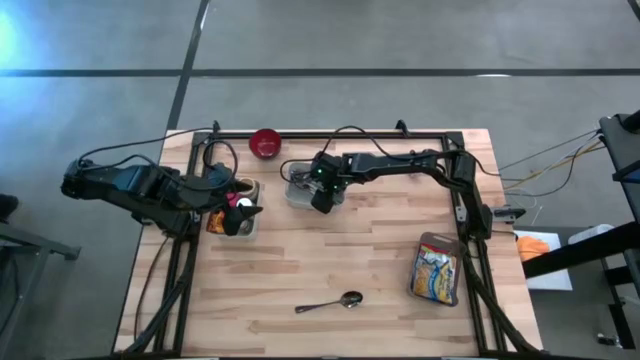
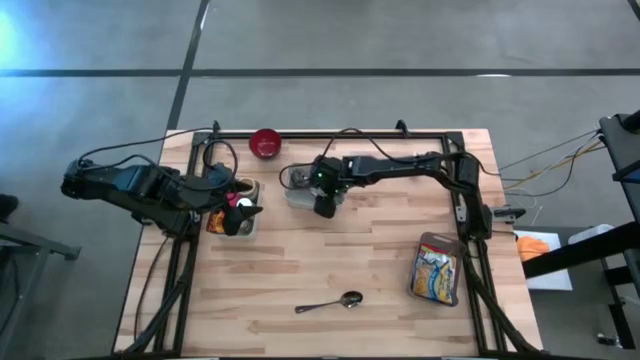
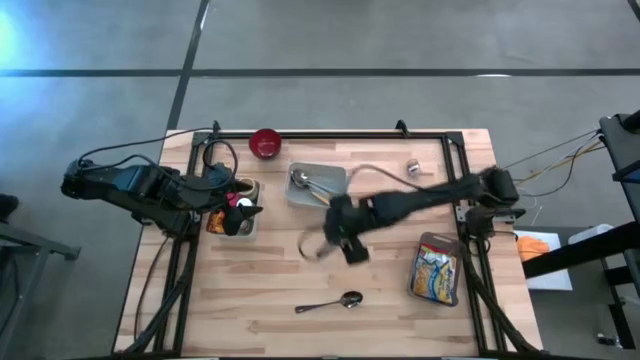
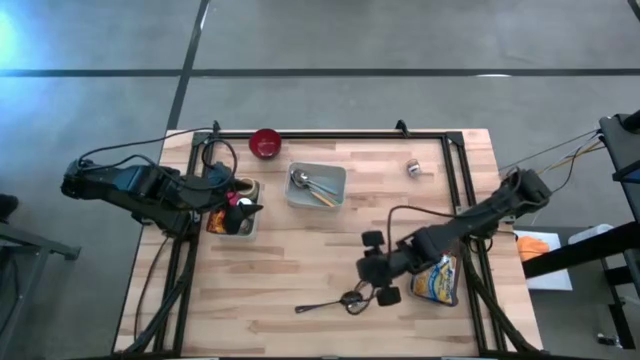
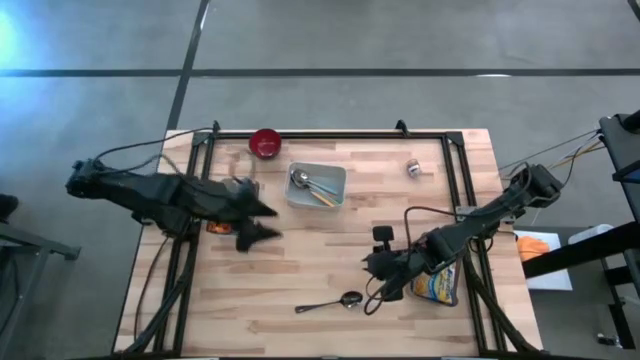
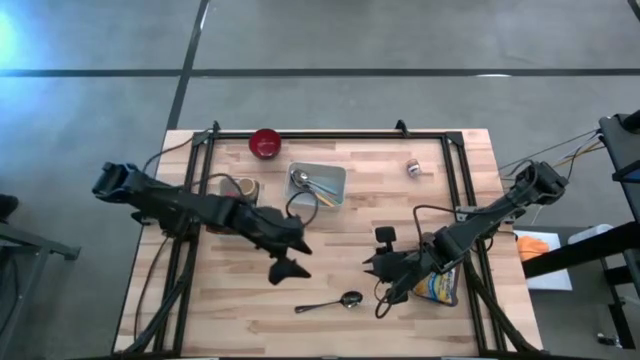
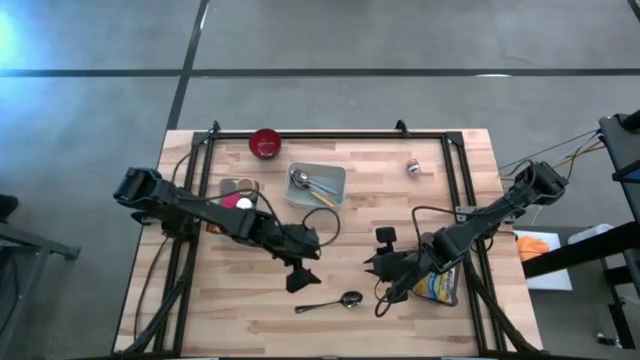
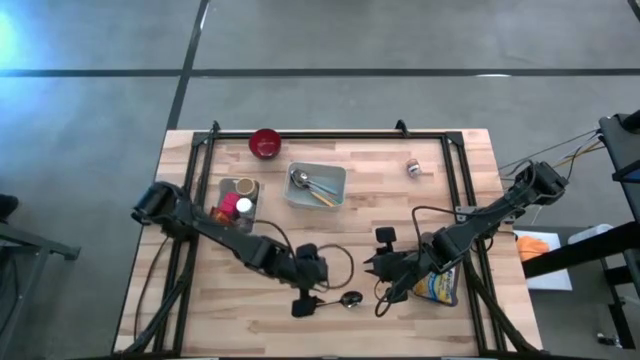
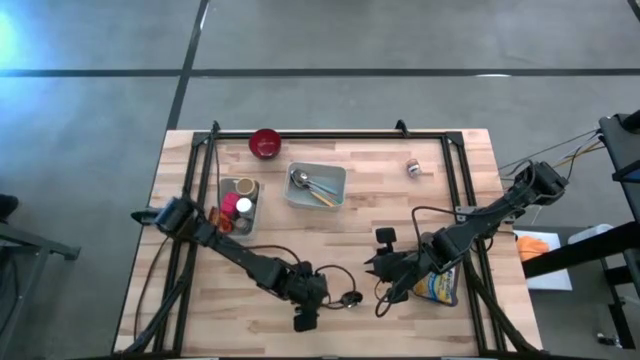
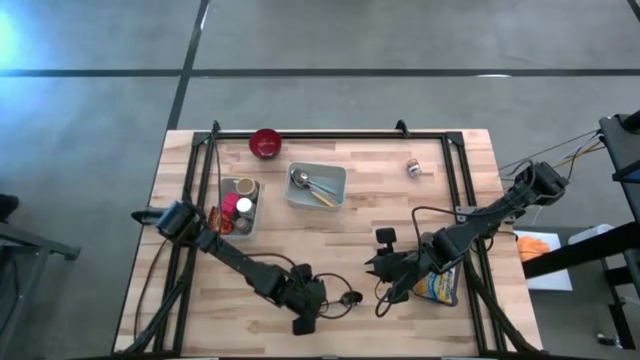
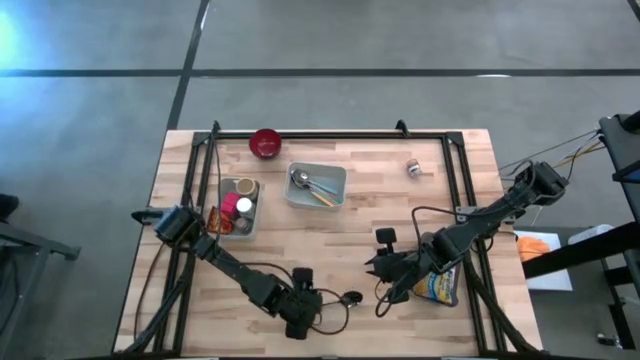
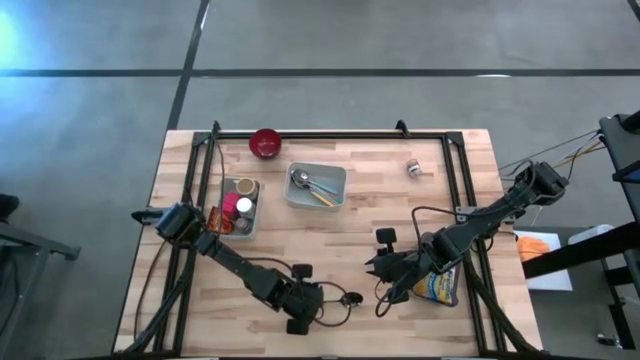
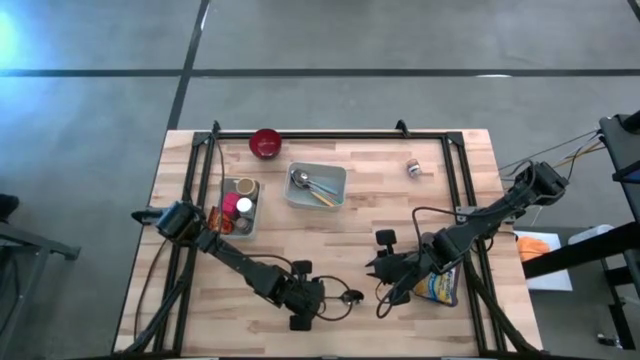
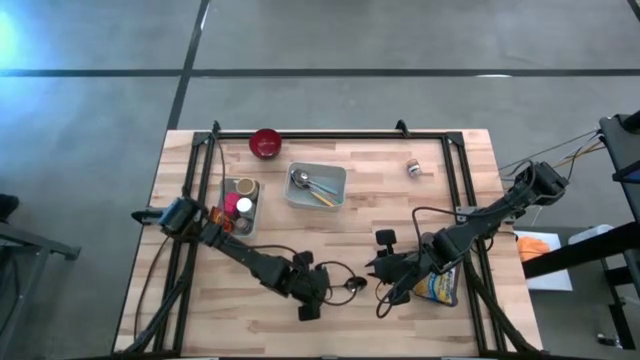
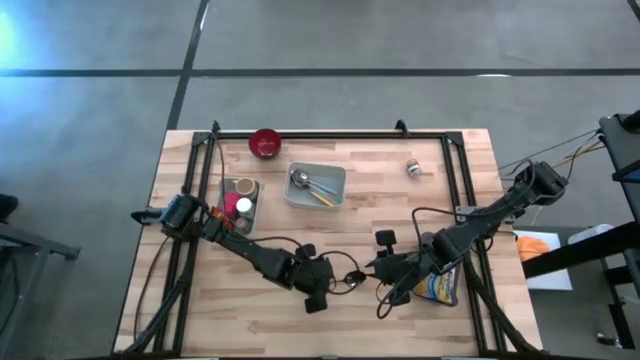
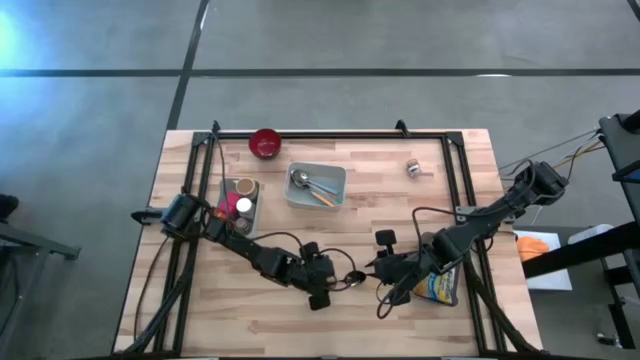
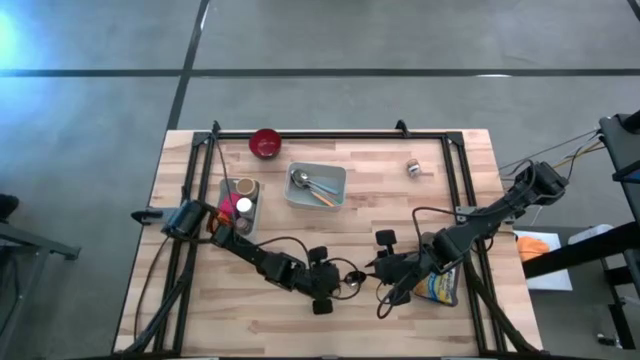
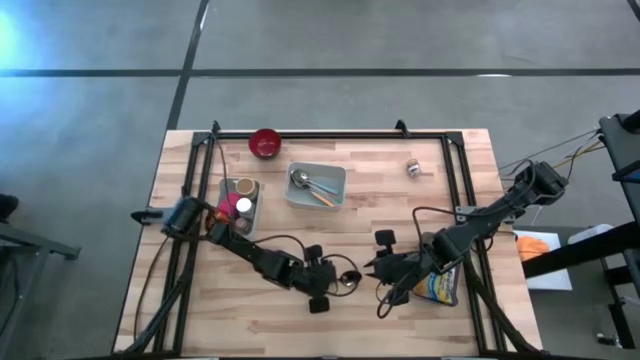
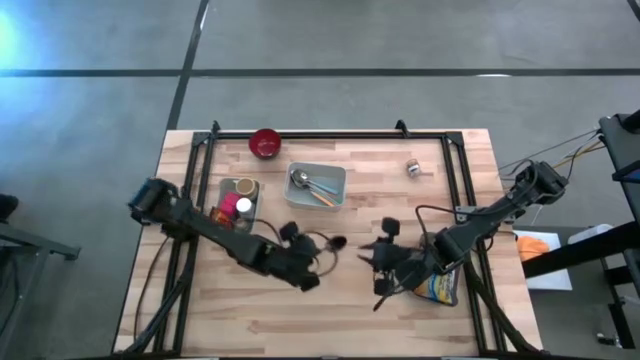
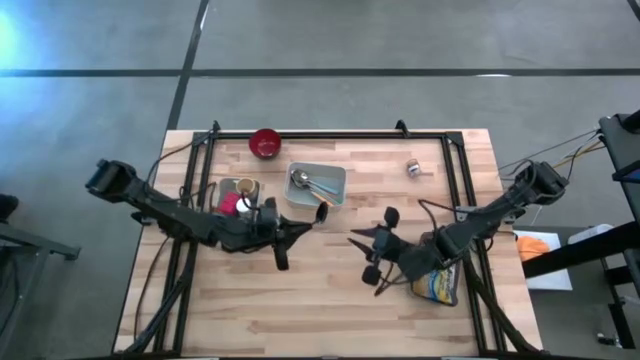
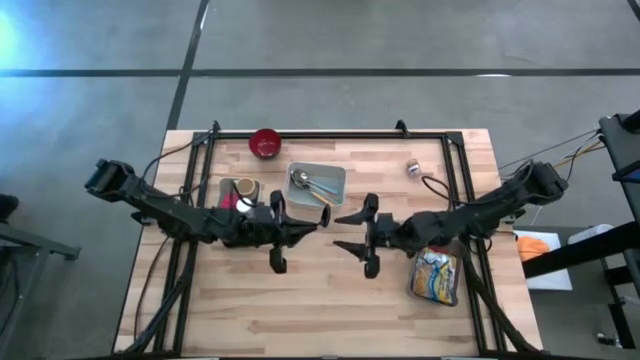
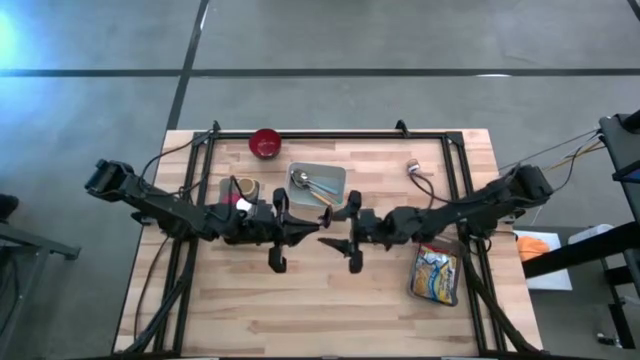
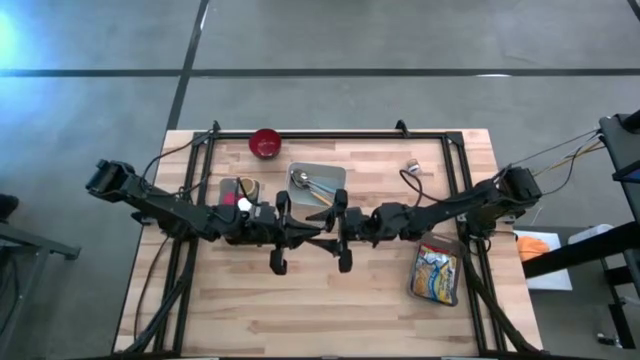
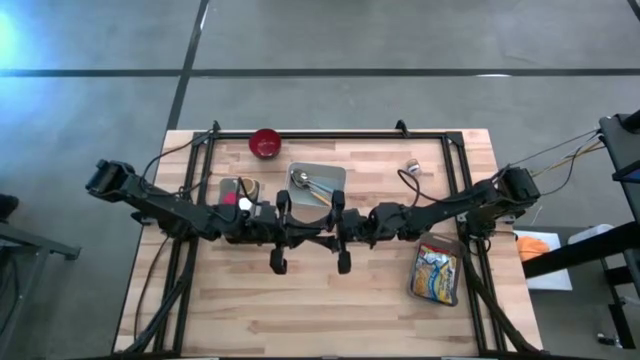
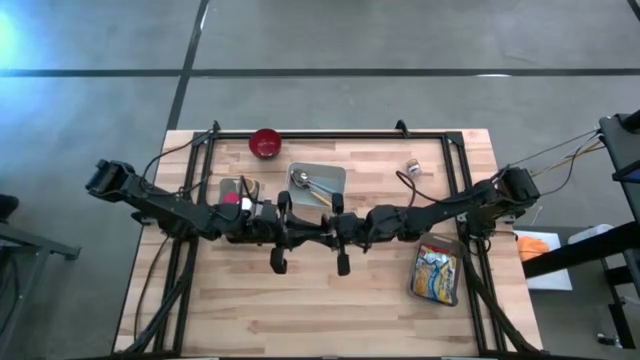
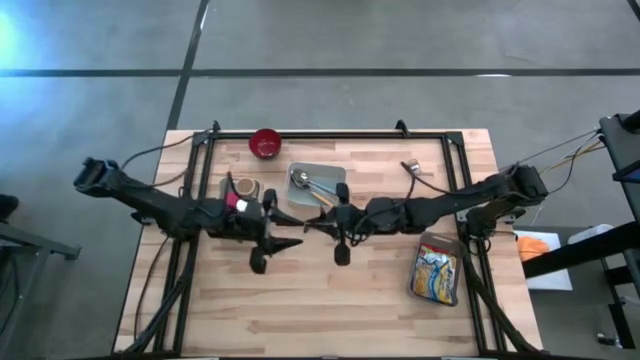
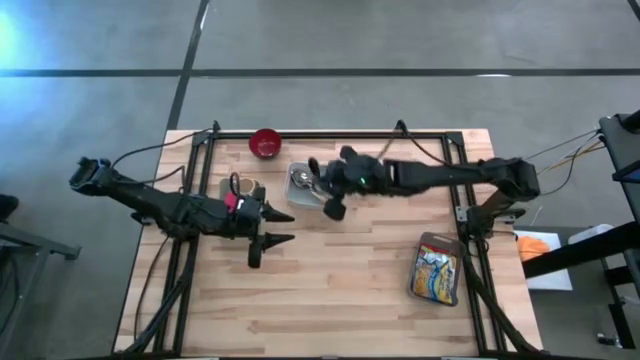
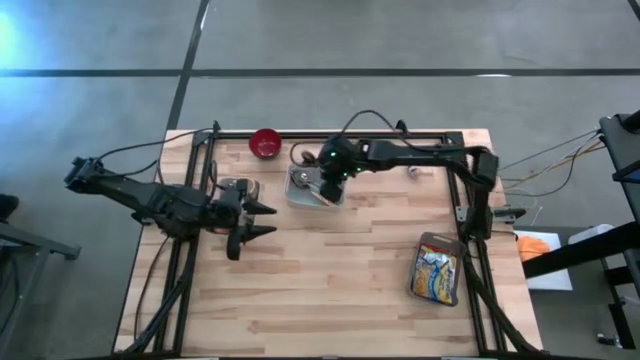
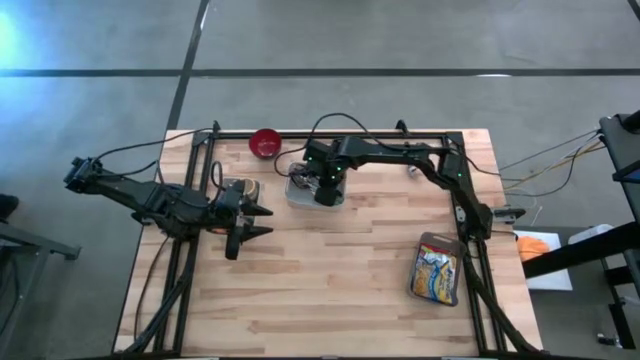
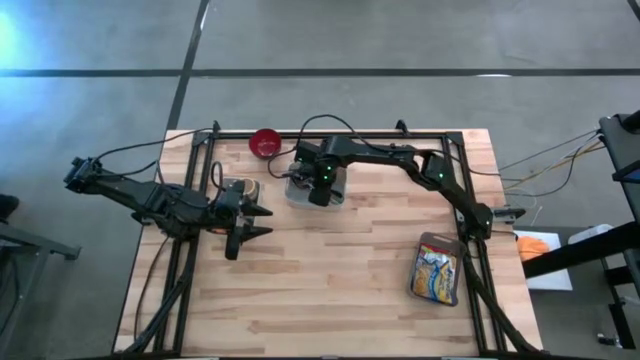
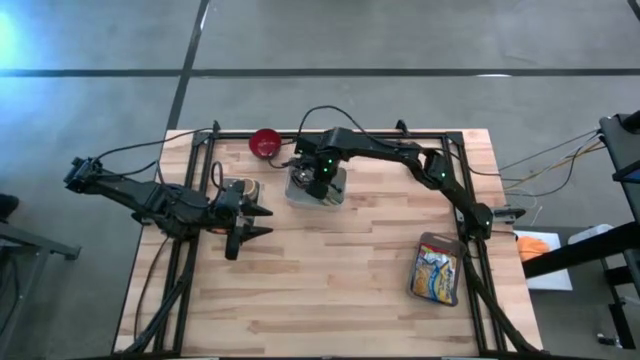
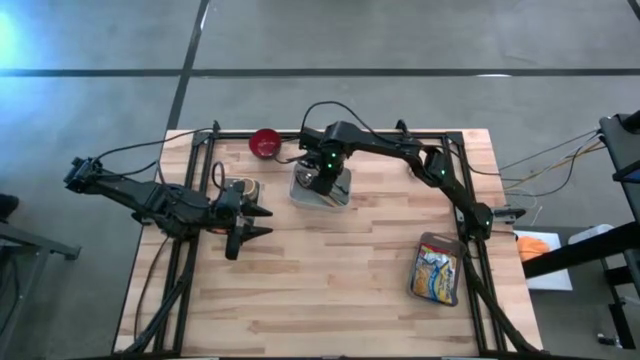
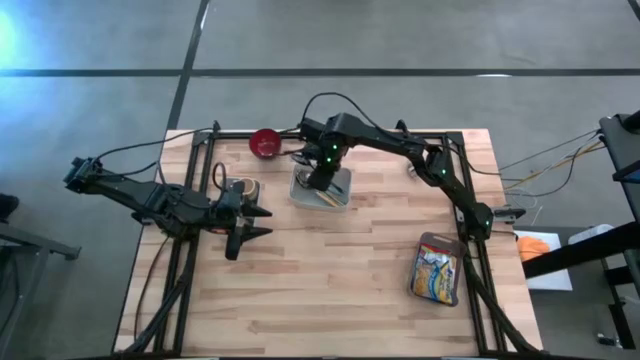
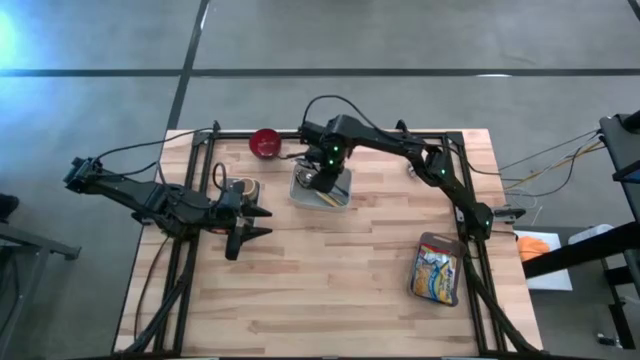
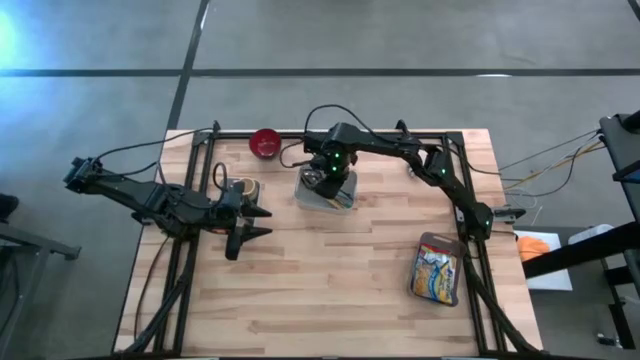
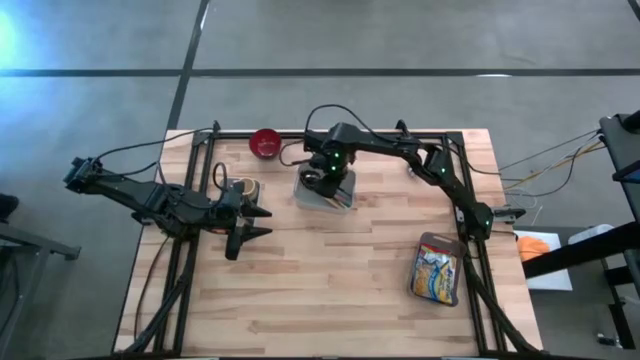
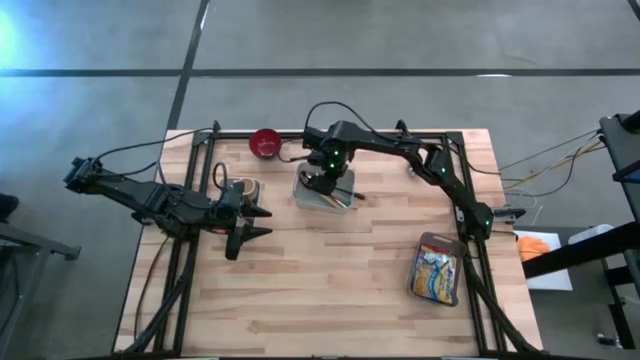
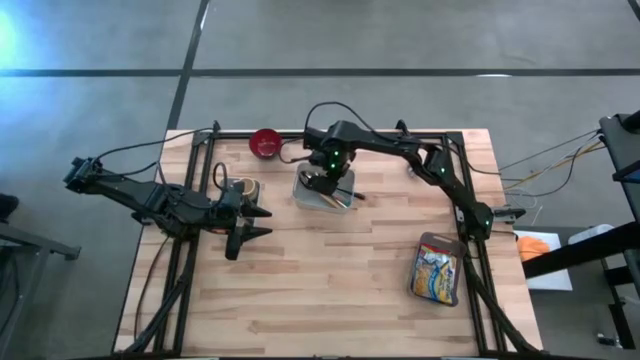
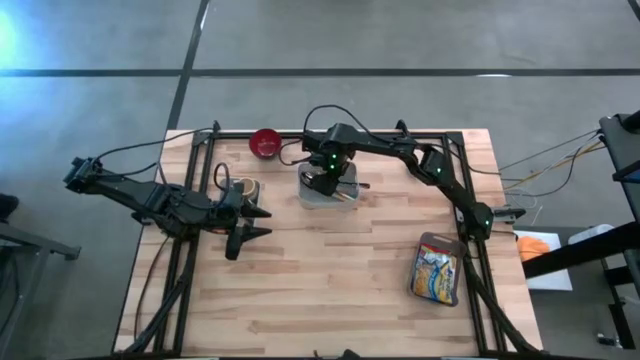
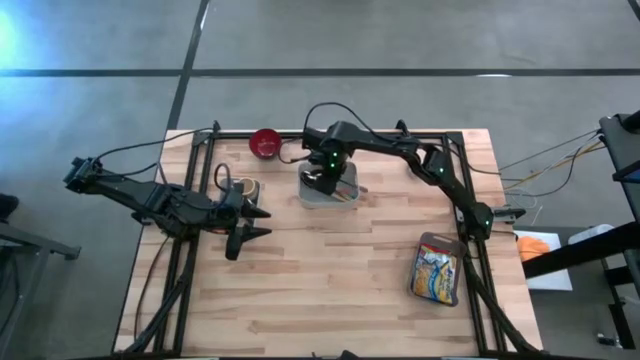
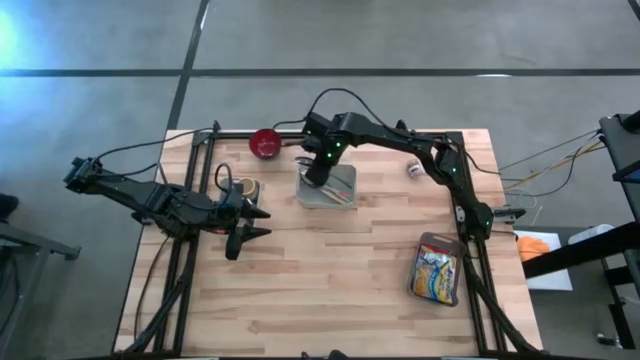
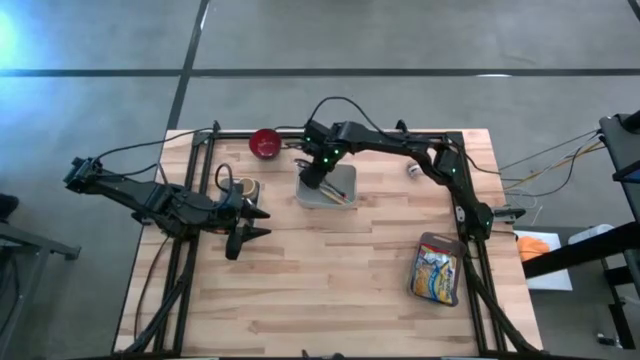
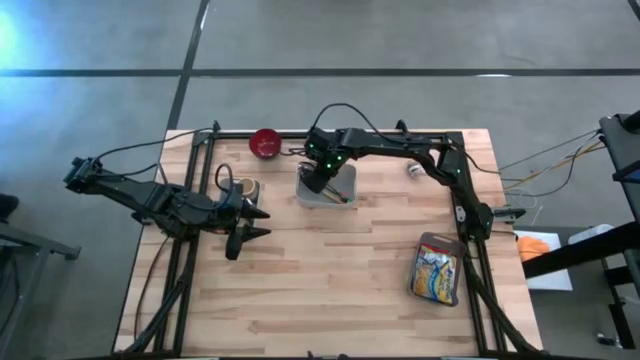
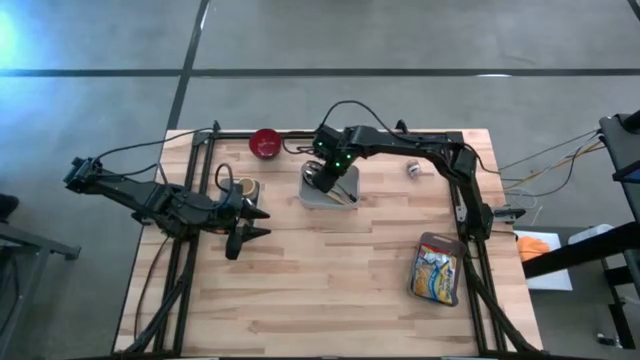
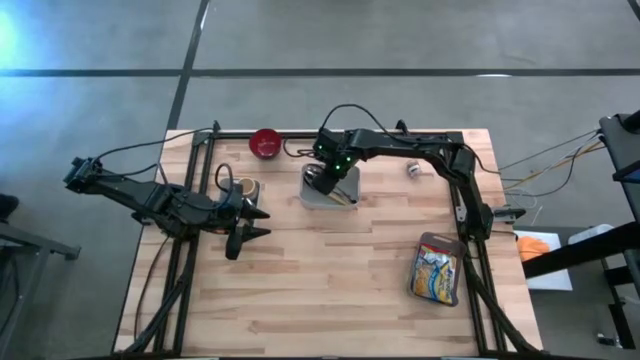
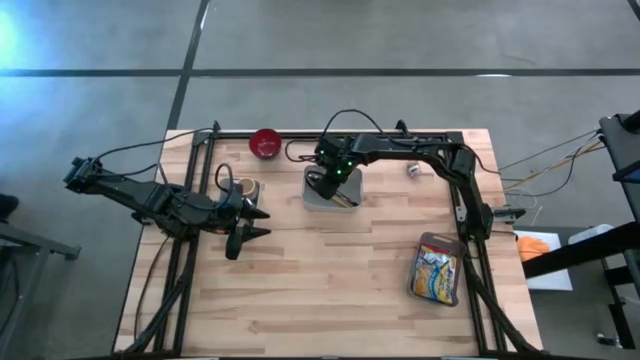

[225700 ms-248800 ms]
Put the black spoon into the right gray bin
